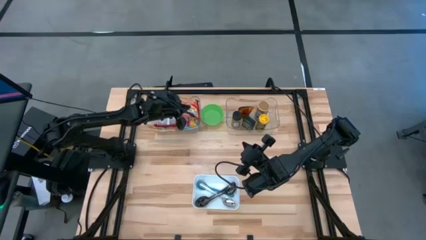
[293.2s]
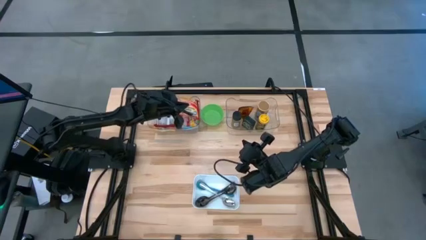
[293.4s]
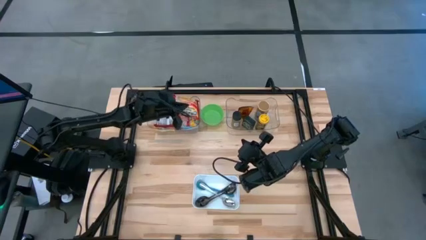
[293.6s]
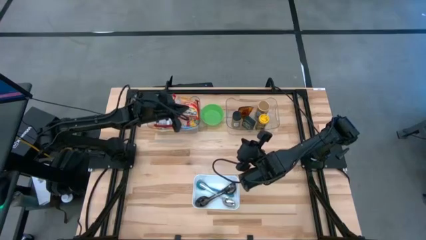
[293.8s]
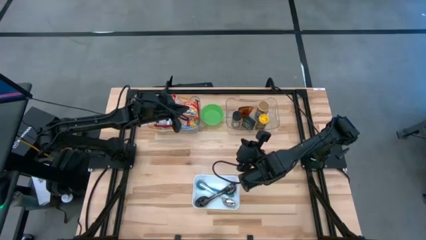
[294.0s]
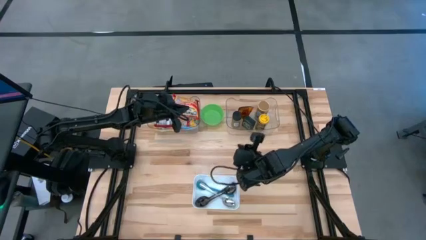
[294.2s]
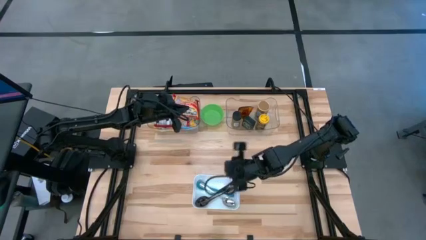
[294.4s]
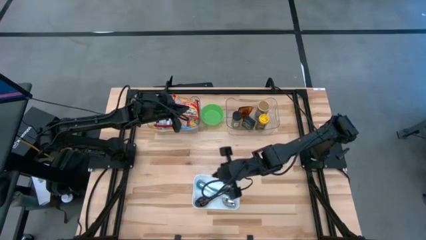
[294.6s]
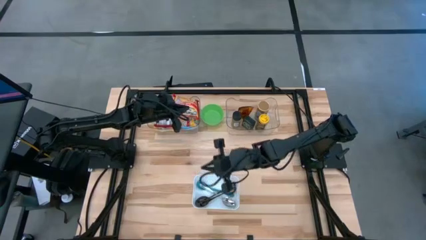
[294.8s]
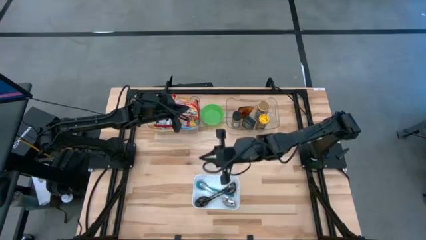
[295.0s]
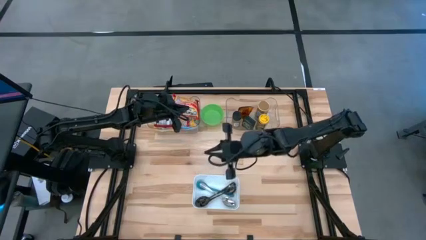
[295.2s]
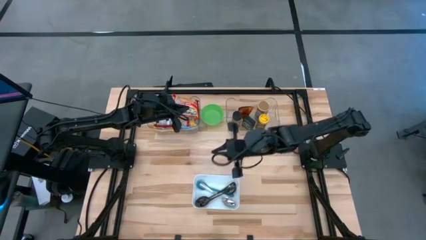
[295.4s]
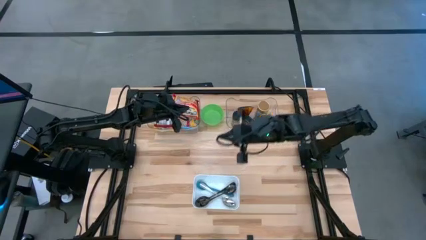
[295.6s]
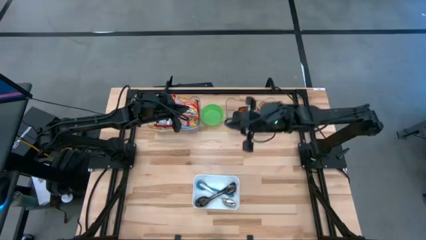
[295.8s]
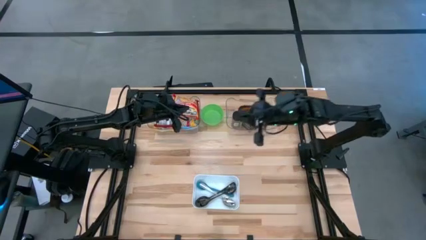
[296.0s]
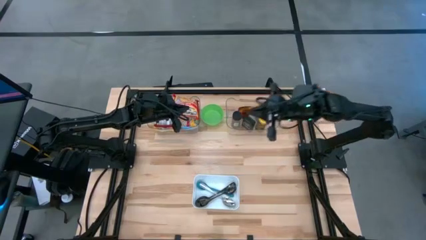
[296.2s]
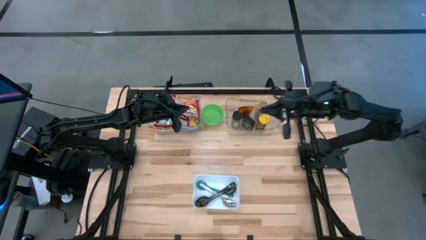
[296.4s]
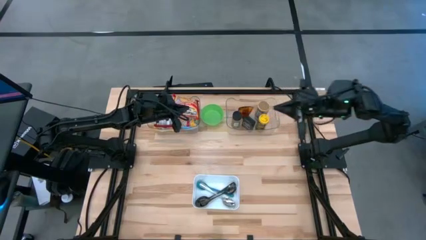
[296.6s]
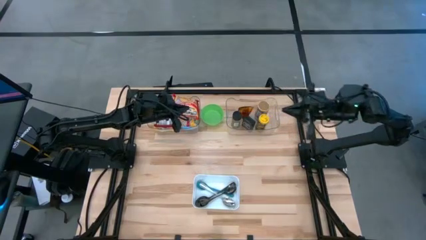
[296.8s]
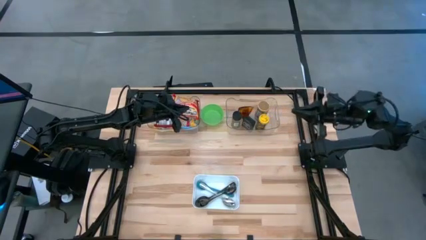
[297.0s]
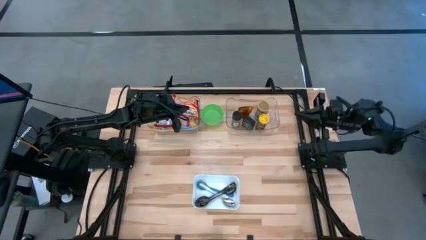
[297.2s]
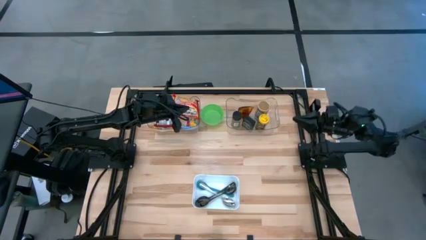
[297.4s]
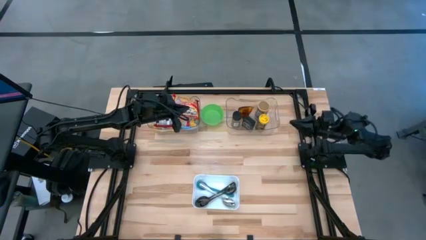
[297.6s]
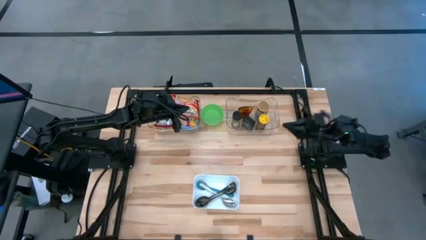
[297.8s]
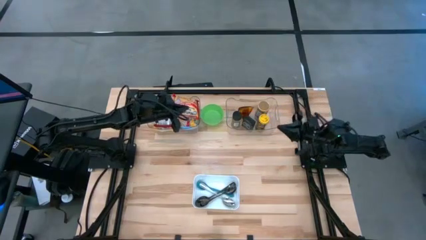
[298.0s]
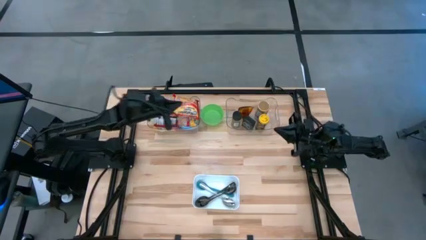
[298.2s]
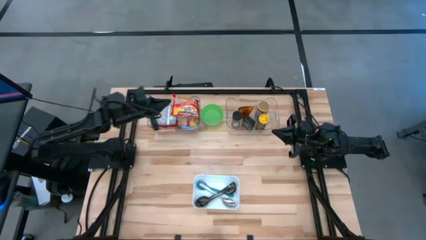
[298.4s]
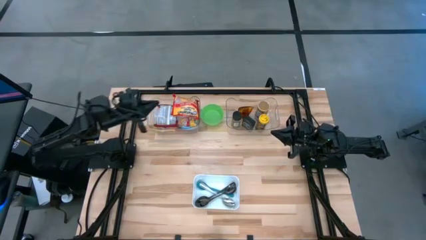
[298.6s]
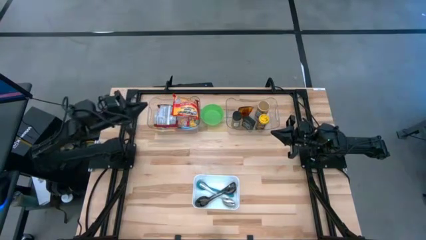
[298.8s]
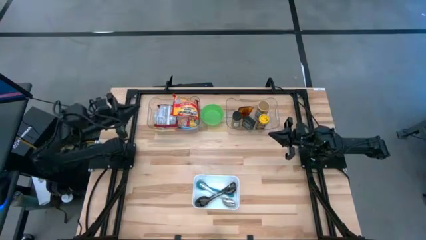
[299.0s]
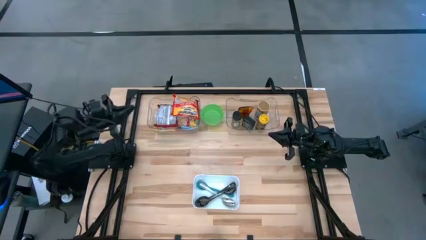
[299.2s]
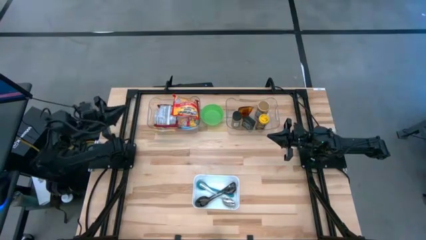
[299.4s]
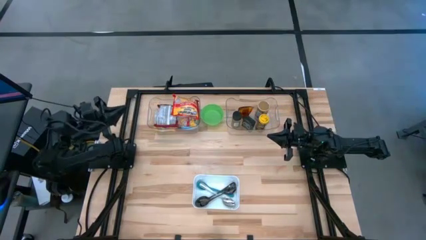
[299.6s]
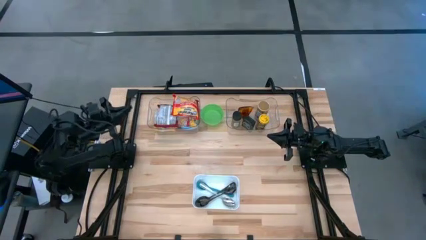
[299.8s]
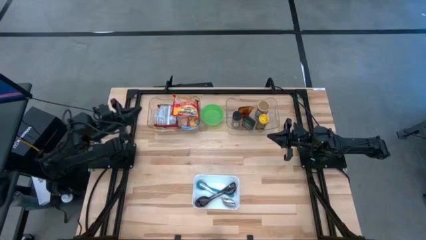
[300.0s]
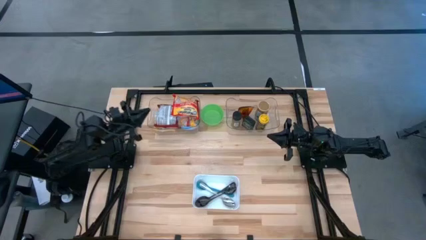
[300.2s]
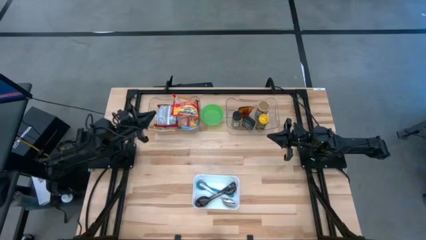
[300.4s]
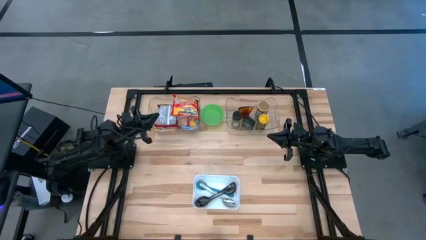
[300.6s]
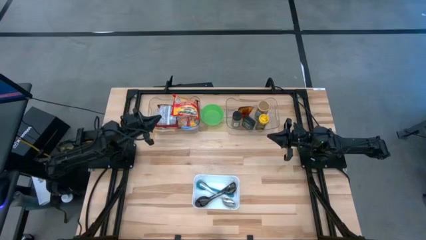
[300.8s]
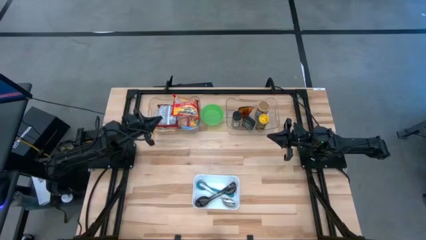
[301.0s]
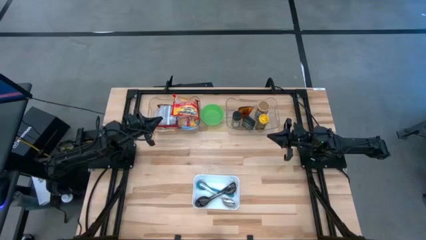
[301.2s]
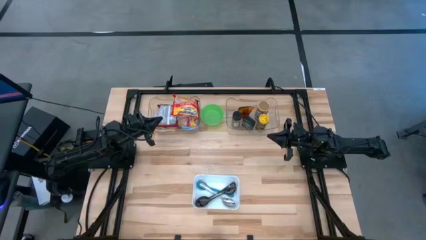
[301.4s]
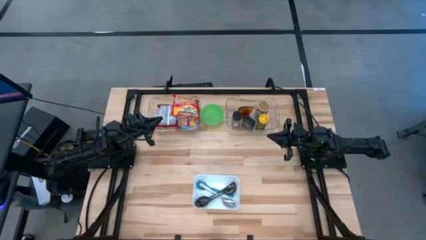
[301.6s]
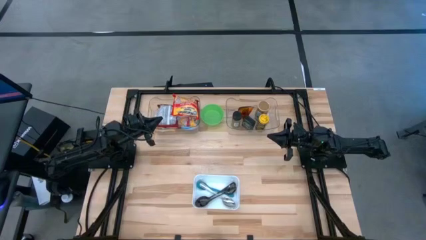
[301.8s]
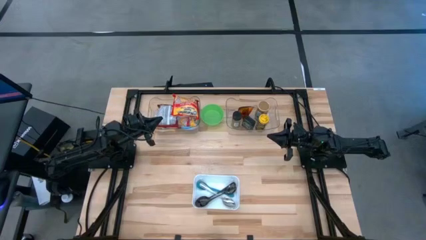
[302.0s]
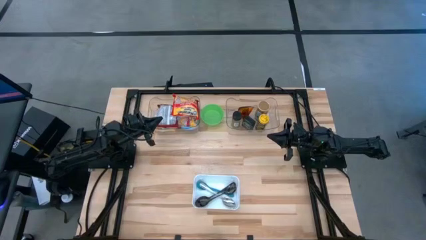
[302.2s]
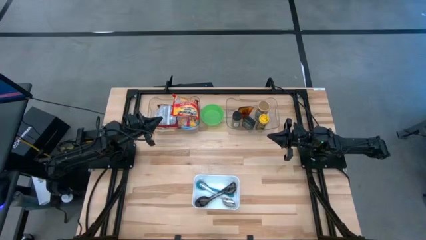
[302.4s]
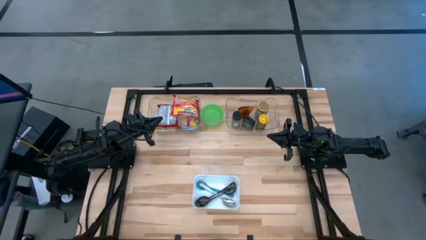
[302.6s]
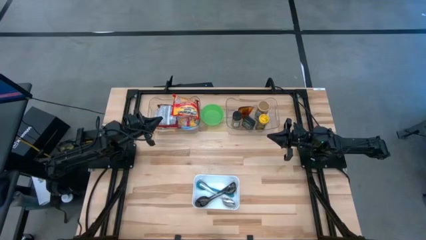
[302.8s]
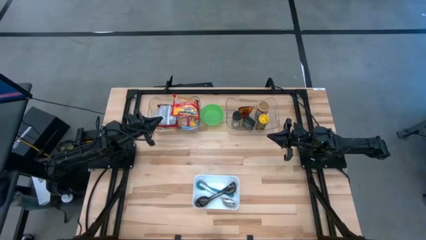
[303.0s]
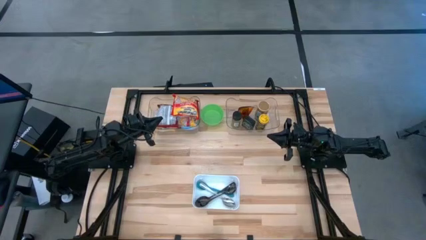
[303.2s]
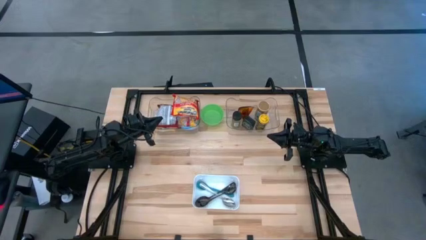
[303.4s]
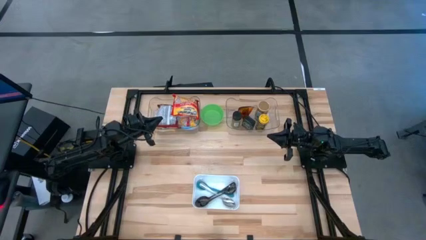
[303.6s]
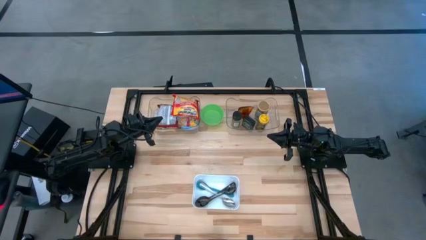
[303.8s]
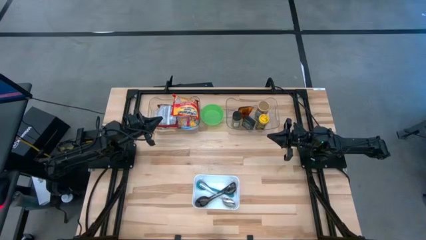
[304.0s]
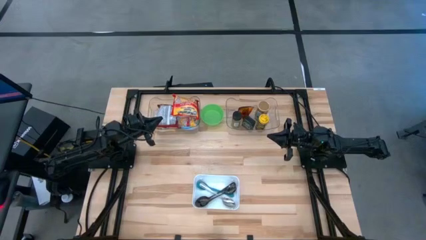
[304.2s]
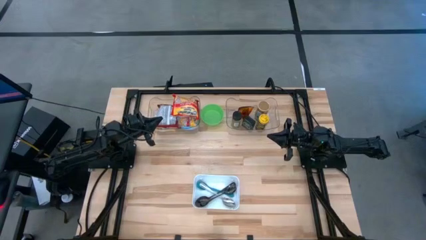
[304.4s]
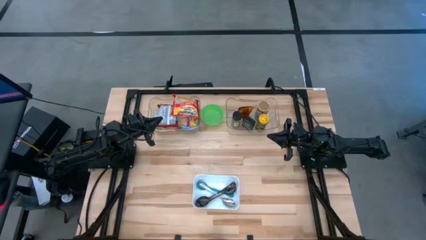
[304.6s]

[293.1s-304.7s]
Task: Pick & Place Food Item
Return to Home Position
